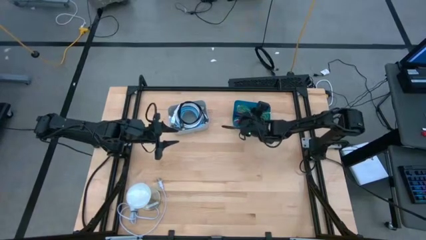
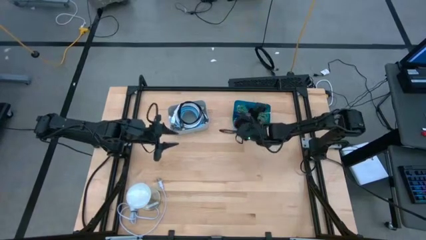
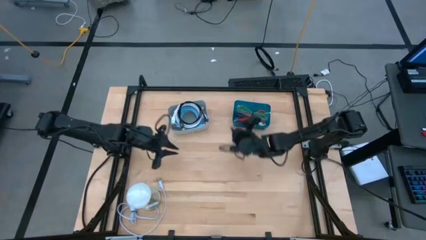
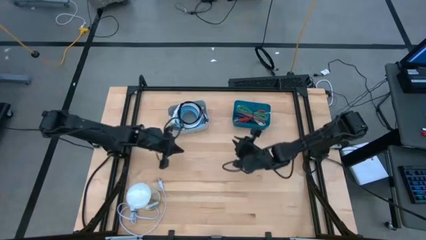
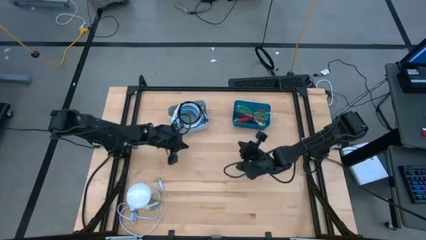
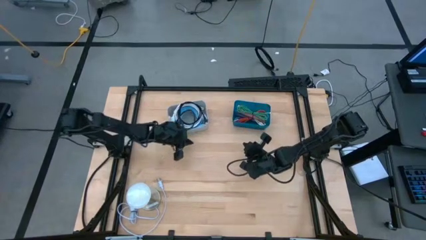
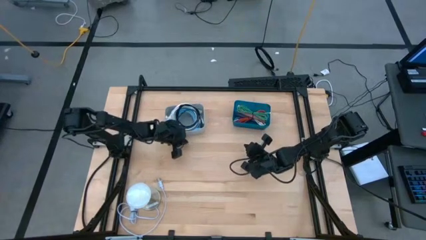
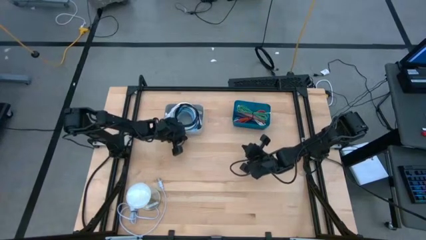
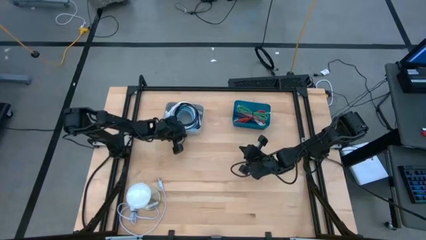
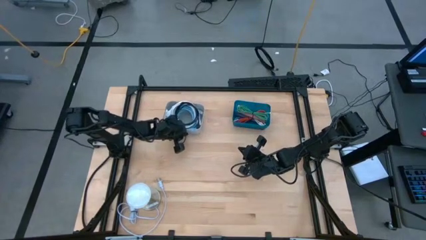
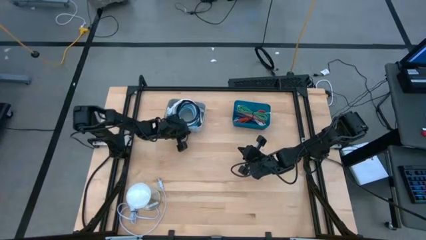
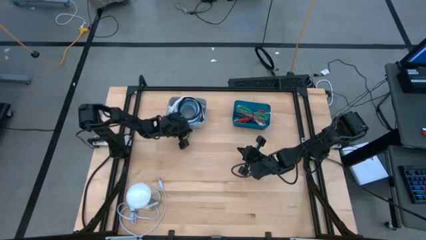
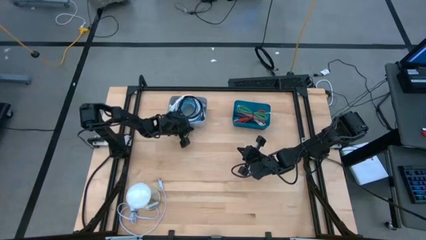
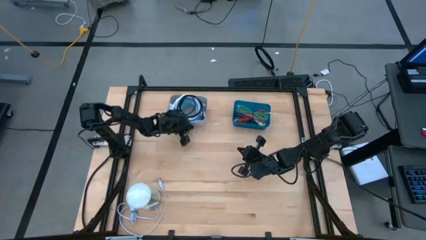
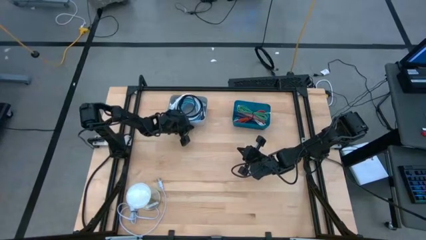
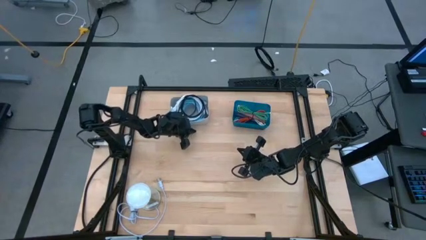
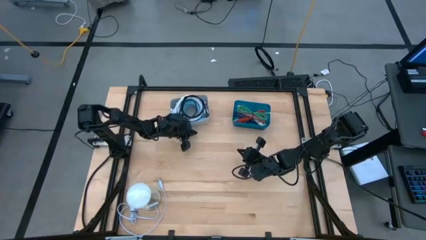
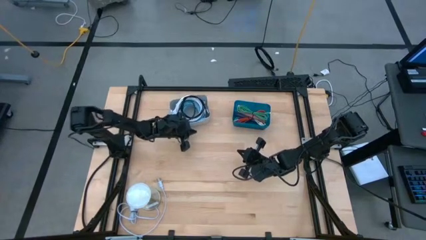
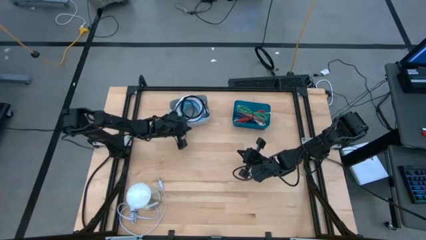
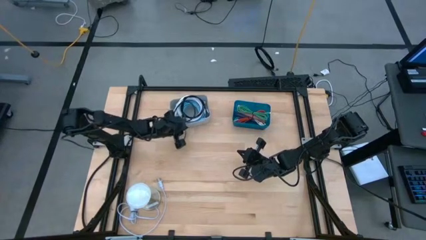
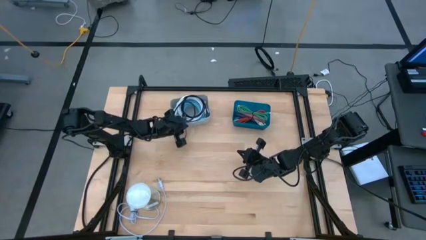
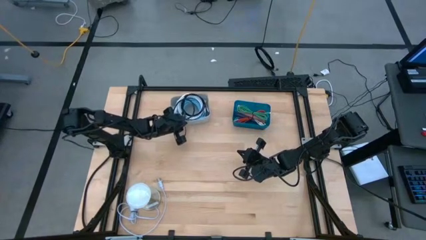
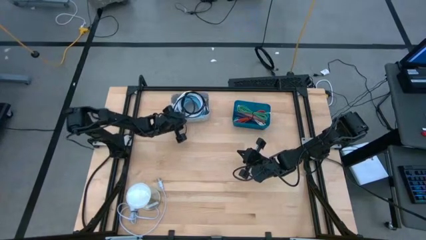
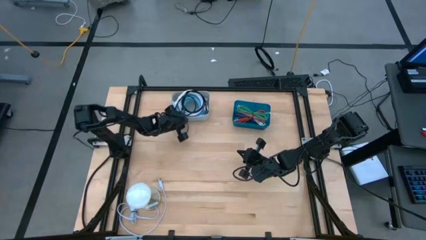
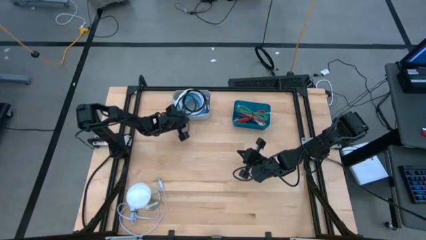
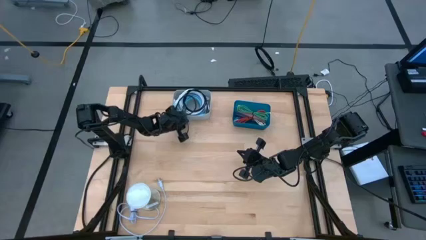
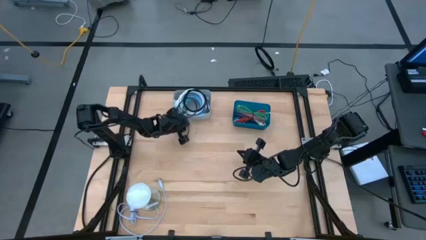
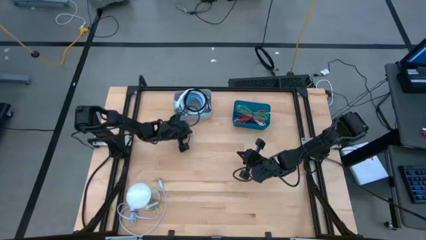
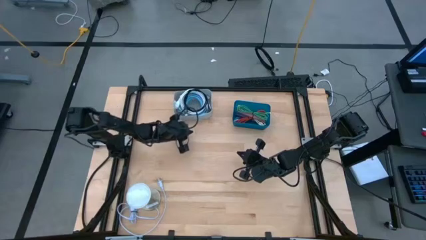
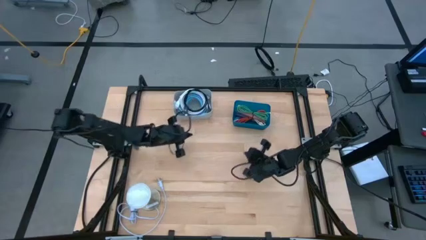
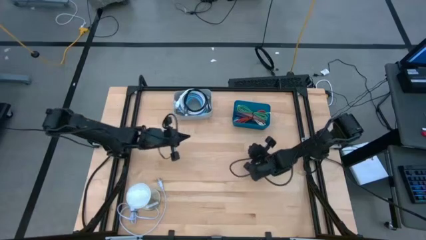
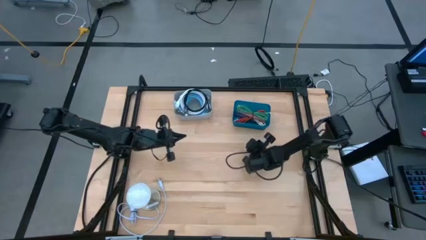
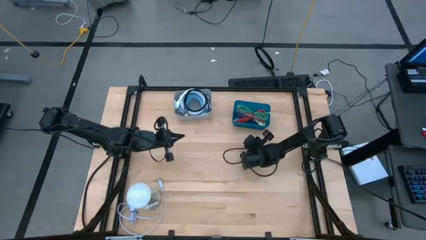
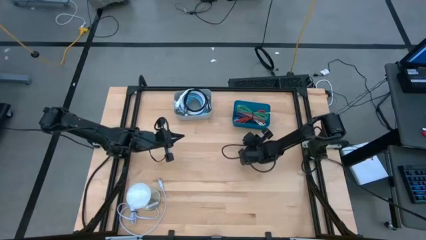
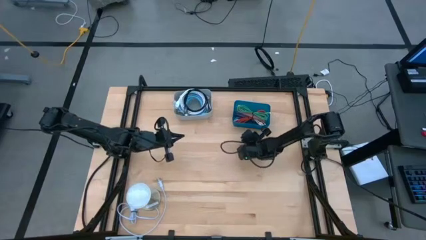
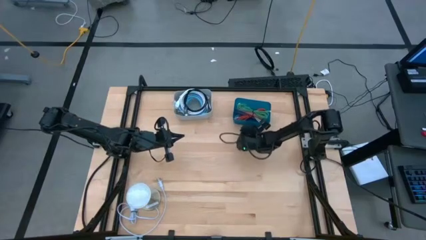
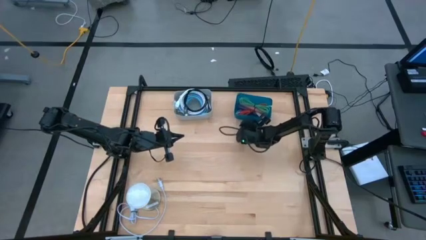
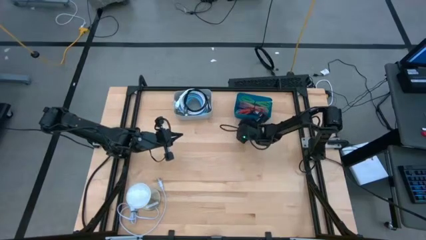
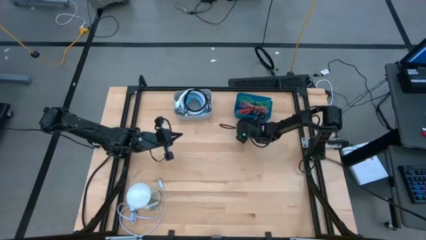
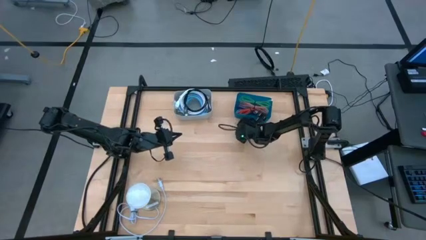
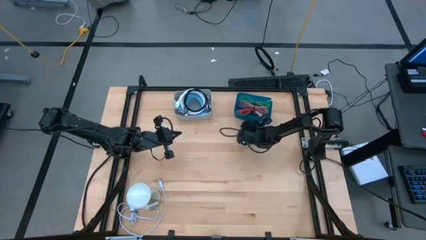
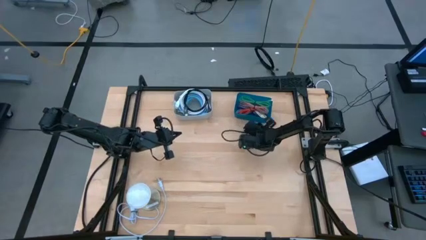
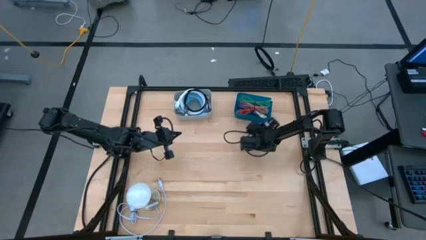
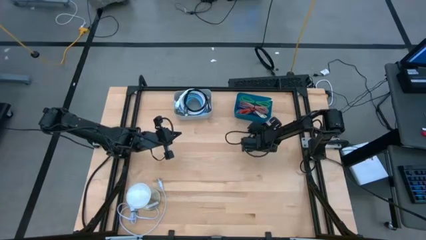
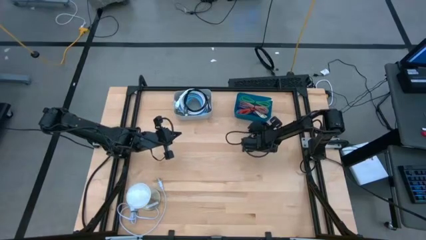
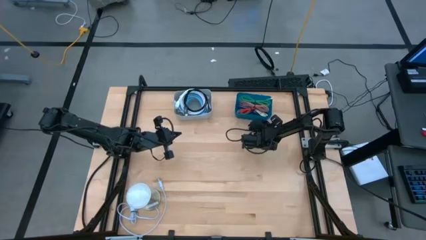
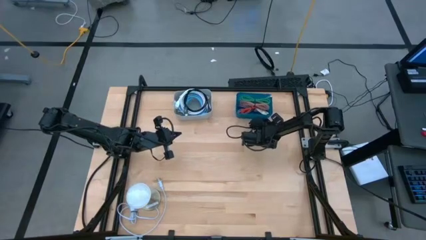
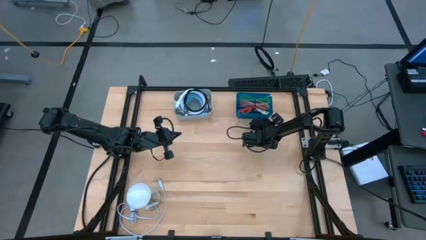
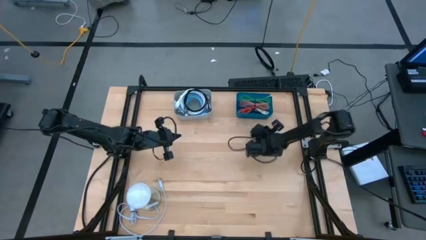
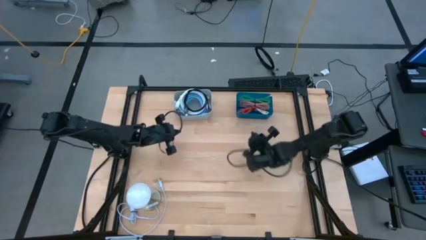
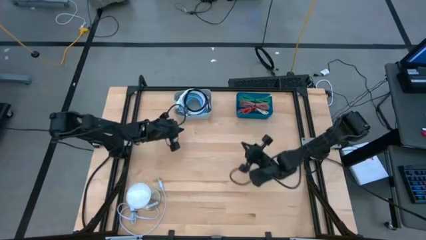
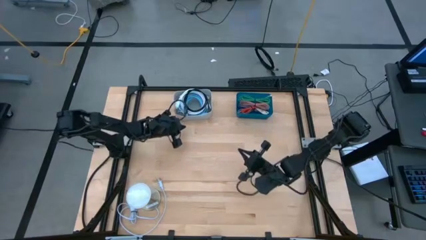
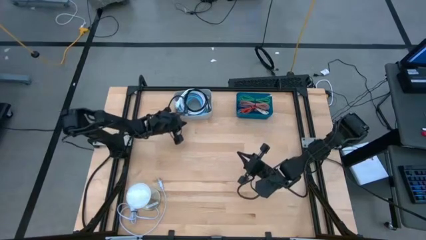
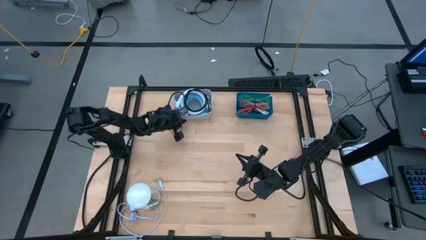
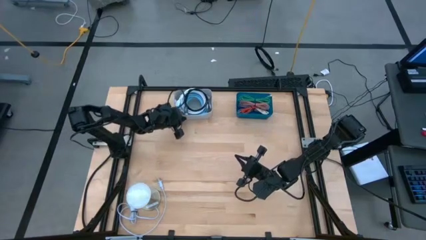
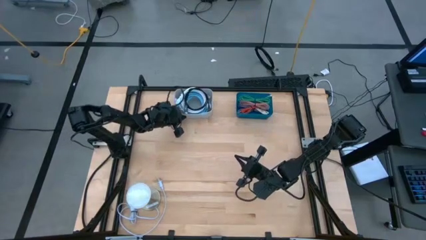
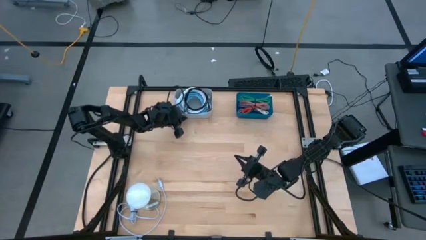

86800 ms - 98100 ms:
Task: Pick & Place USB Port
Adjust the bins on the table

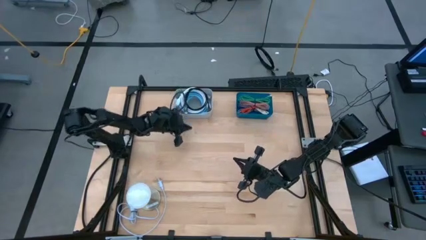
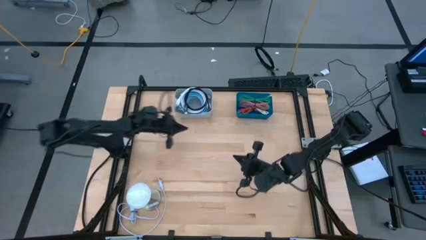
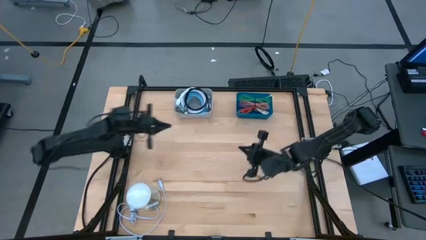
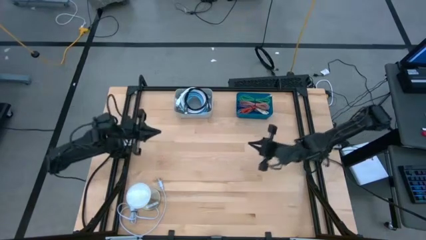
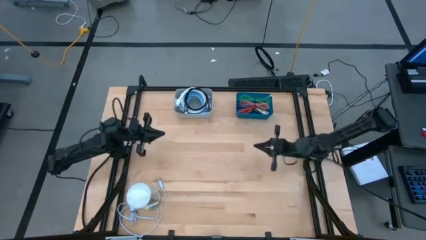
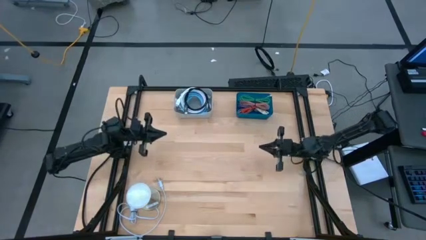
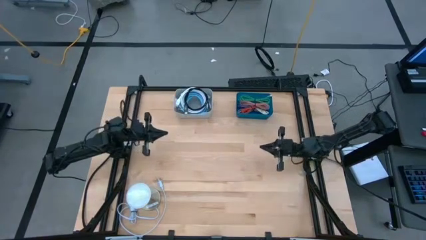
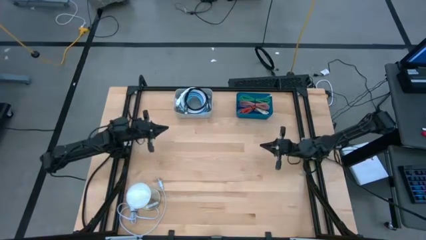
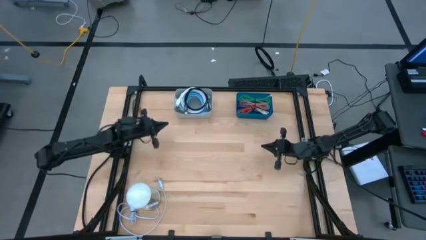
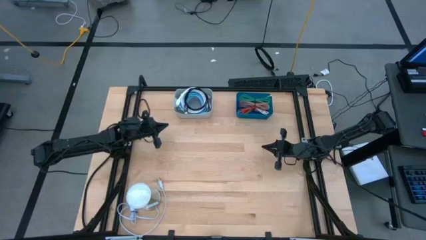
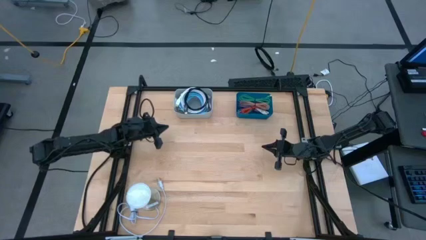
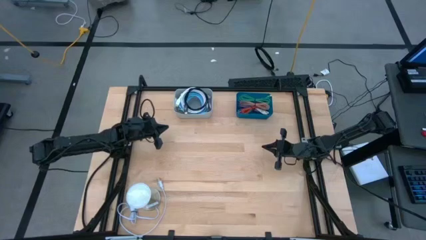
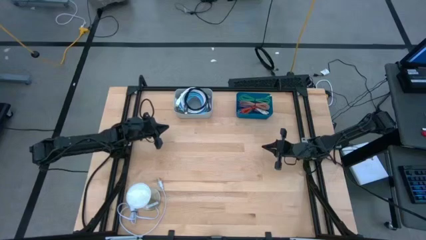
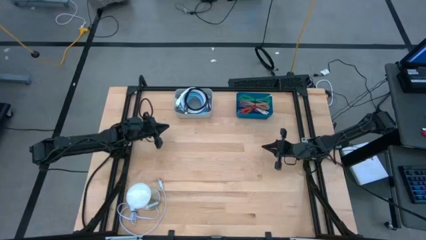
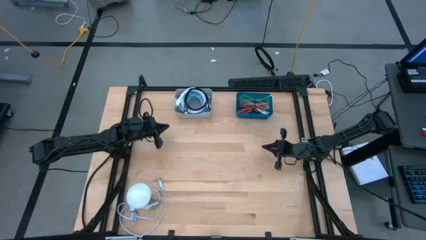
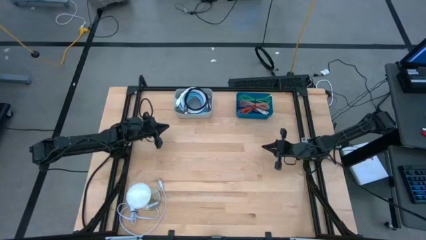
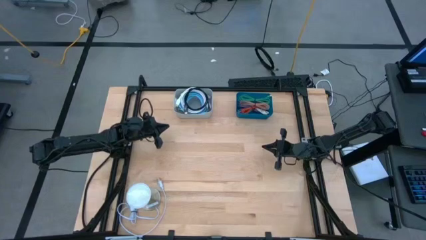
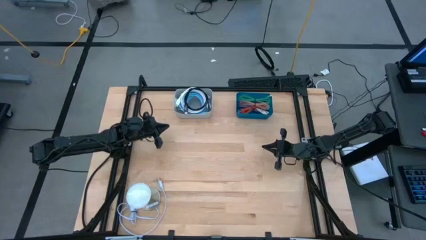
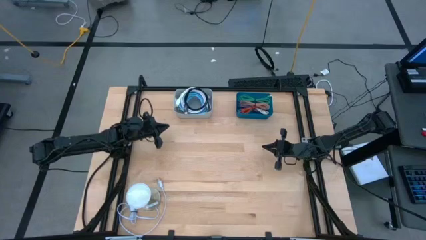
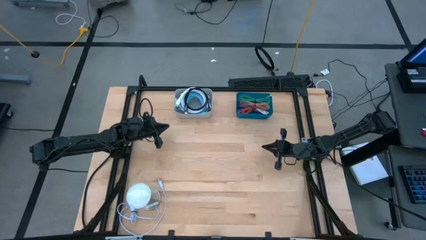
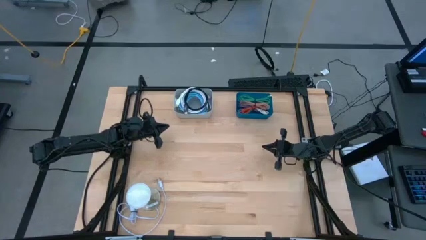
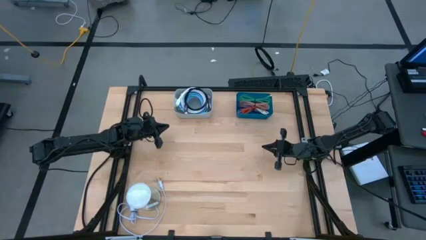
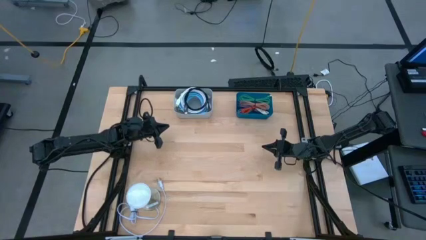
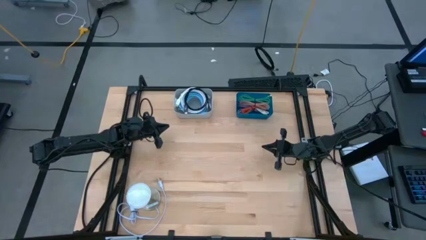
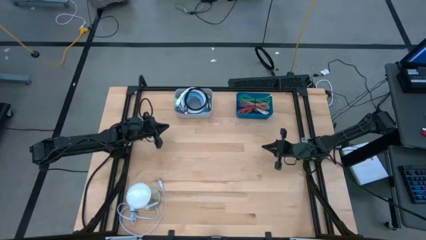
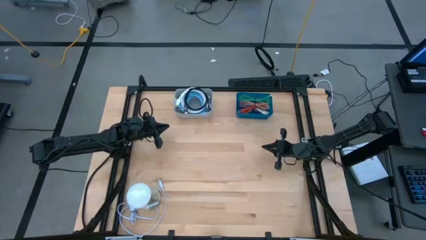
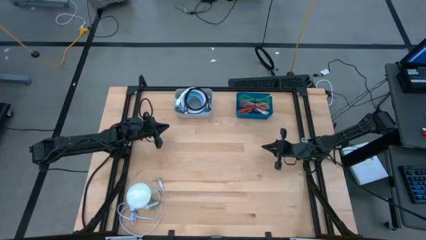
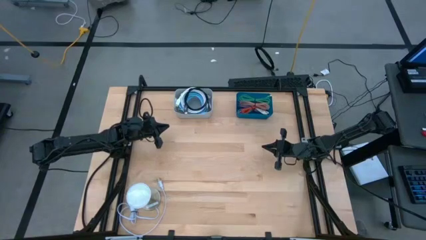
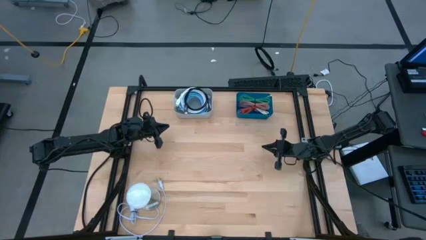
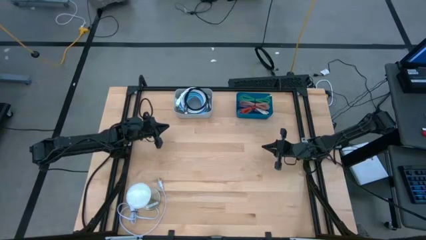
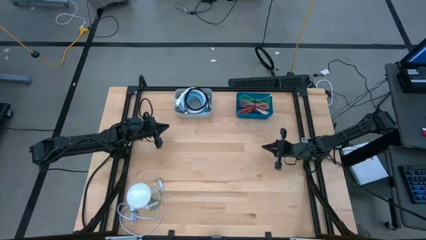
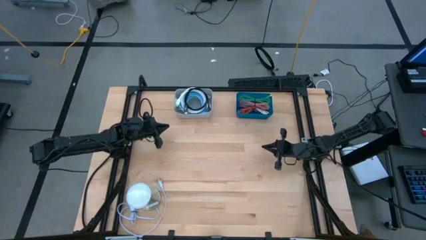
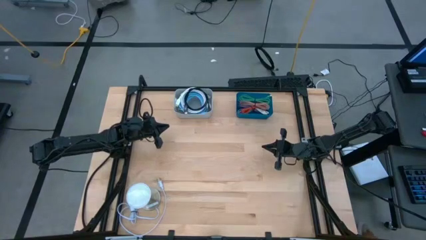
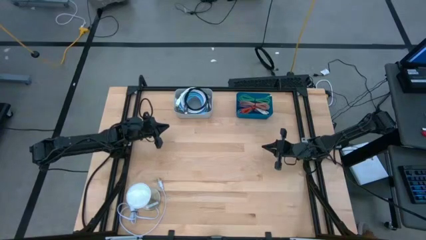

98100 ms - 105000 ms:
Return to Home Position
